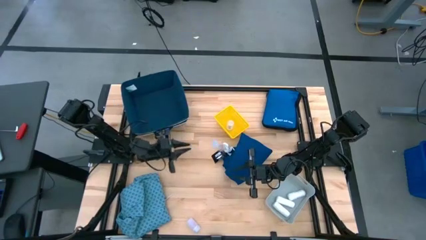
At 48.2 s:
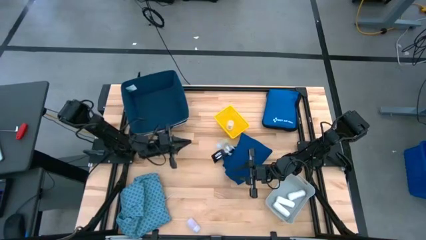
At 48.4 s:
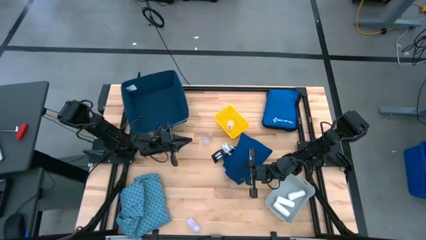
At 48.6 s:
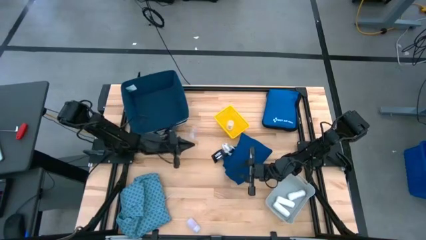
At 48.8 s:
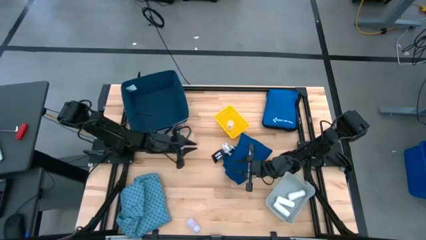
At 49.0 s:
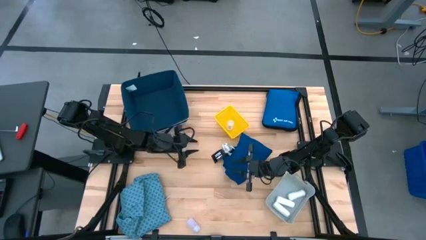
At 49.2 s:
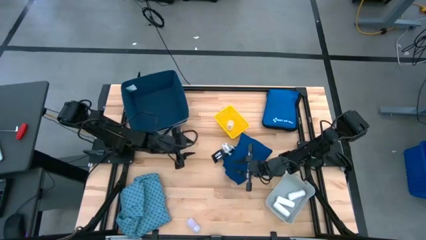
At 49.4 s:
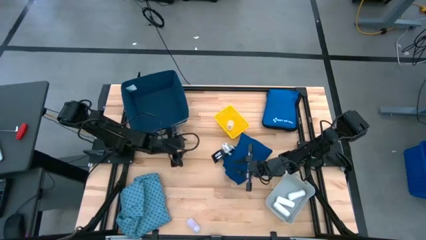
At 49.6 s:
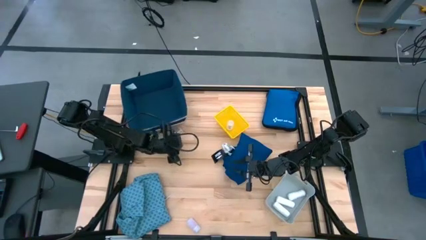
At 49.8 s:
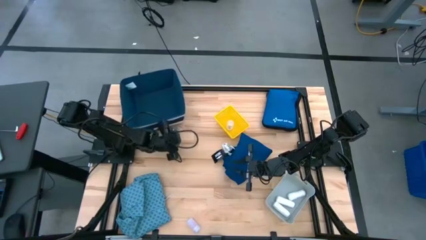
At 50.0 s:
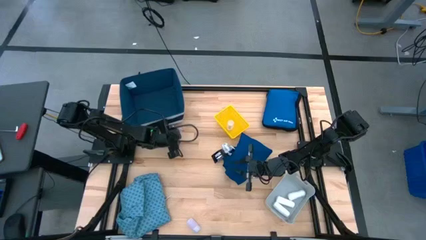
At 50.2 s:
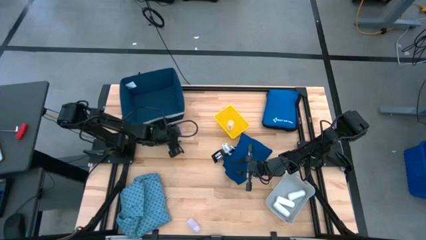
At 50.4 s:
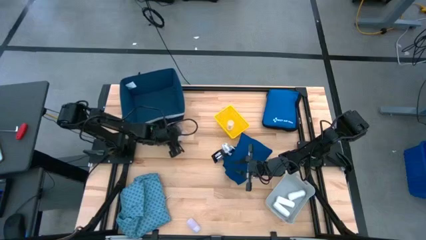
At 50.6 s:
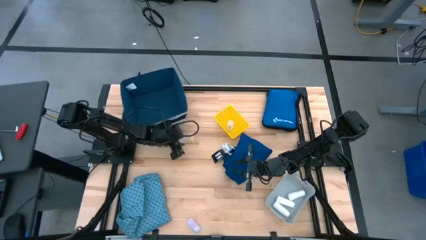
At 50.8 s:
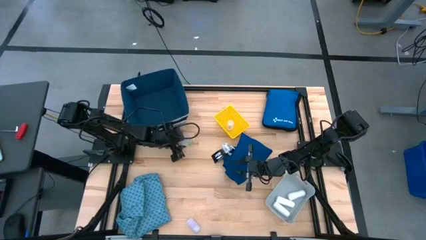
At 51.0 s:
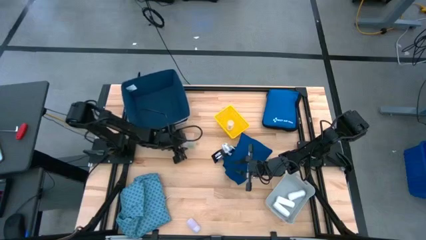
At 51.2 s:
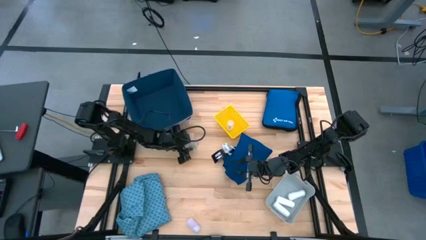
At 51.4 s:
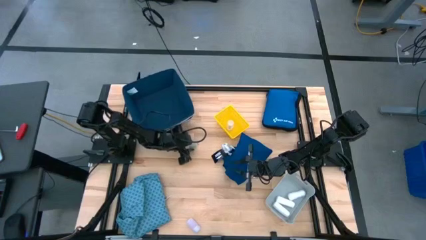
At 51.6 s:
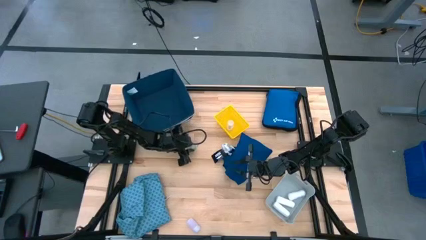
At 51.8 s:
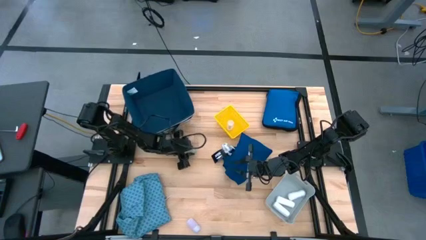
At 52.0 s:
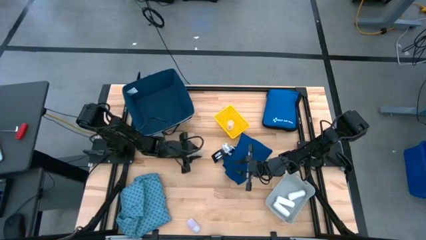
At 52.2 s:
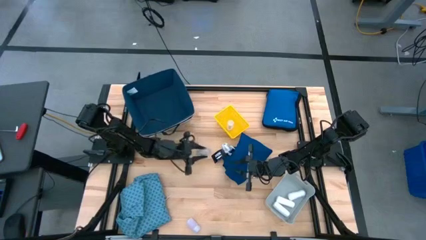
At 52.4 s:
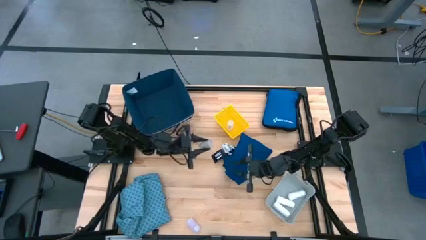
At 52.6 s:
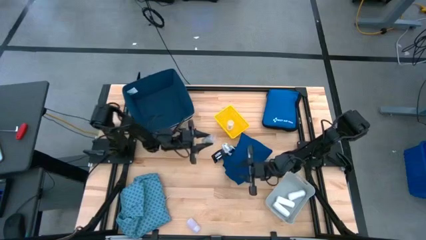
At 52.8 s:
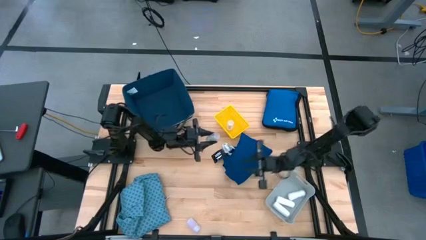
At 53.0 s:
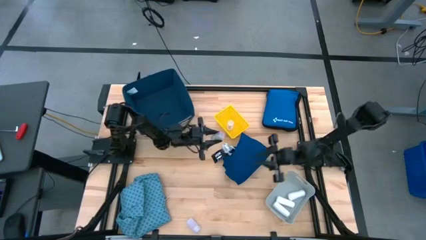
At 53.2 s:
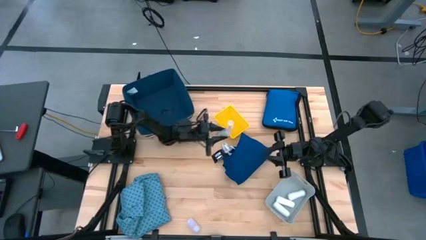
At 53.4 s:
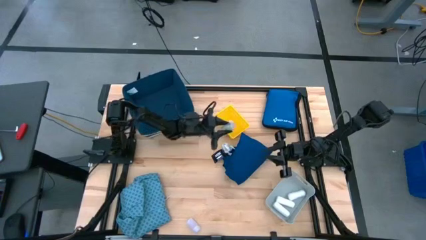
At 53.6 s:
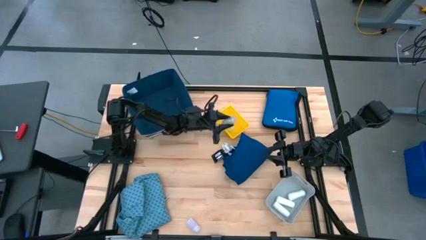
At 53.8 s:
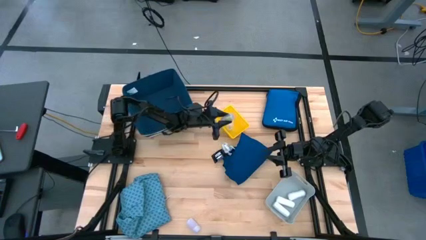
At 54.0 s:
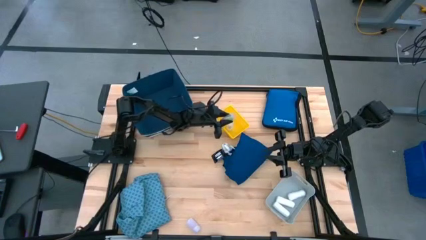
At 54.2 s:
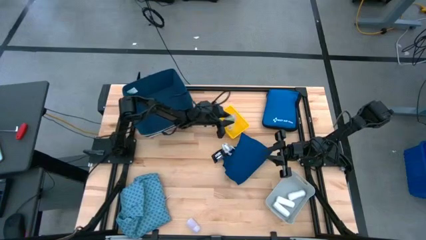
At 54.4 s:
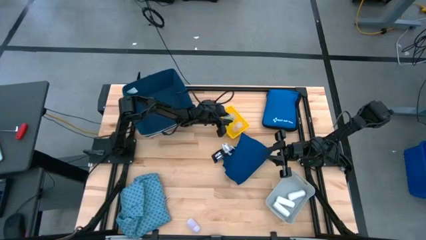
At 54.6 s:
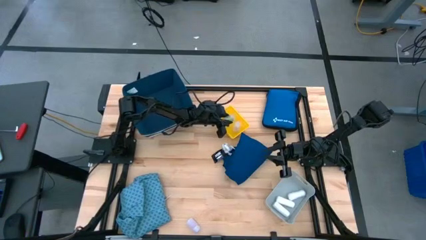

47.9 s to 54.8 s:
Task: Pick & place medical supplies in basket/bin
Put the top transparent pill bottle into the yellow bin

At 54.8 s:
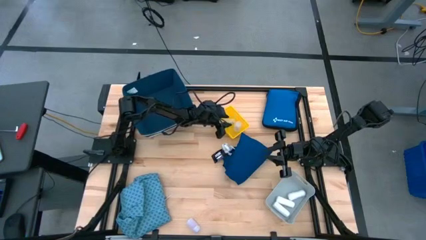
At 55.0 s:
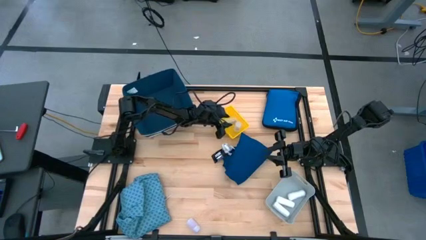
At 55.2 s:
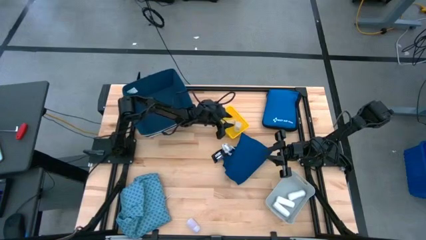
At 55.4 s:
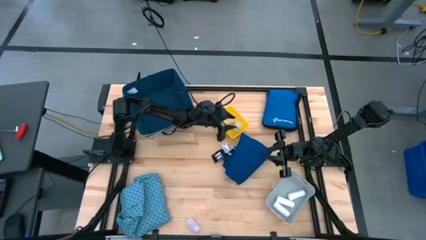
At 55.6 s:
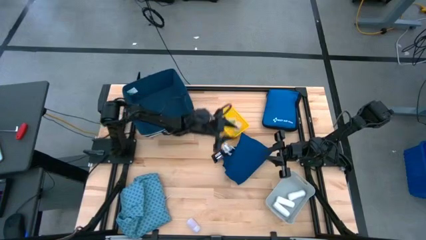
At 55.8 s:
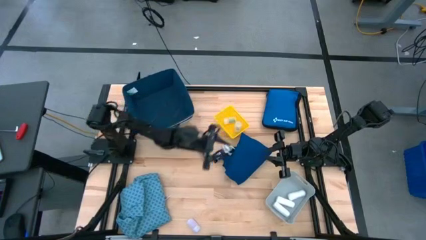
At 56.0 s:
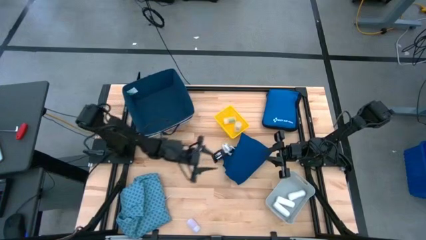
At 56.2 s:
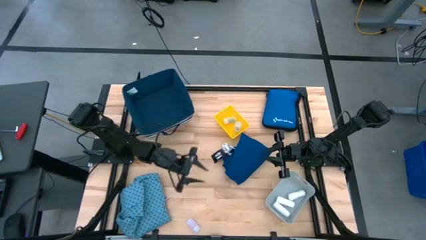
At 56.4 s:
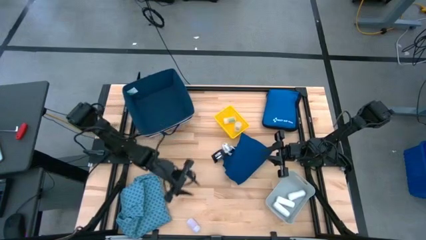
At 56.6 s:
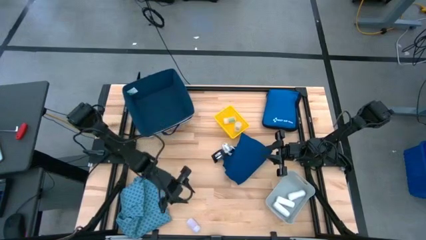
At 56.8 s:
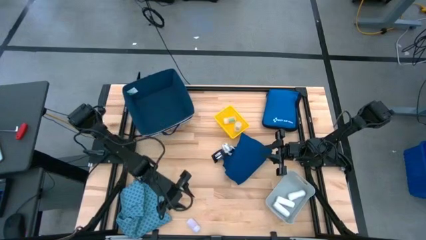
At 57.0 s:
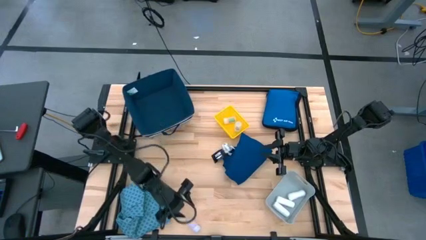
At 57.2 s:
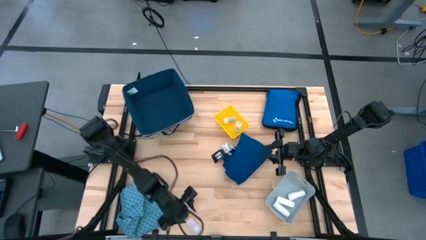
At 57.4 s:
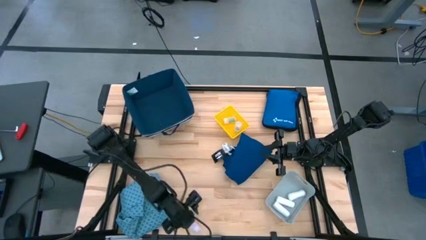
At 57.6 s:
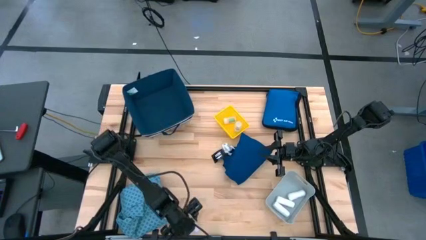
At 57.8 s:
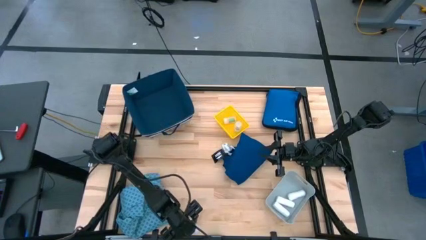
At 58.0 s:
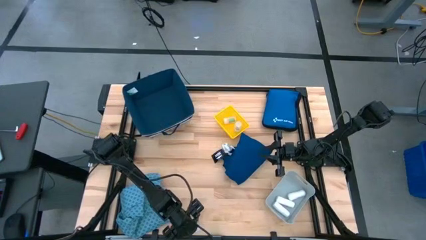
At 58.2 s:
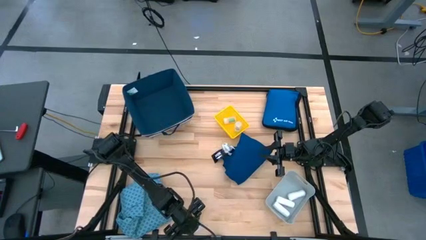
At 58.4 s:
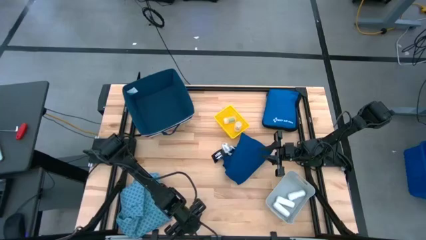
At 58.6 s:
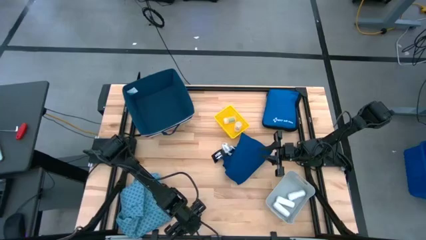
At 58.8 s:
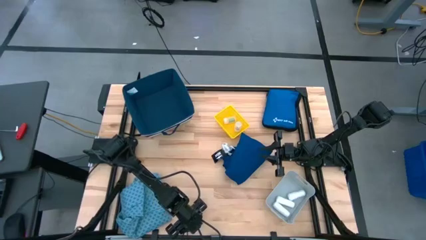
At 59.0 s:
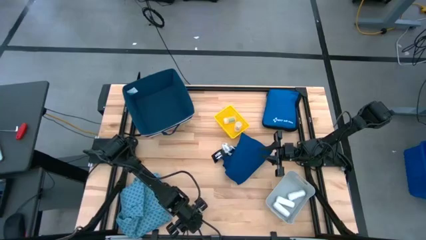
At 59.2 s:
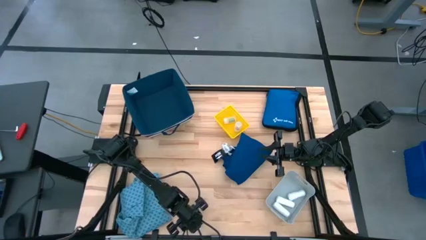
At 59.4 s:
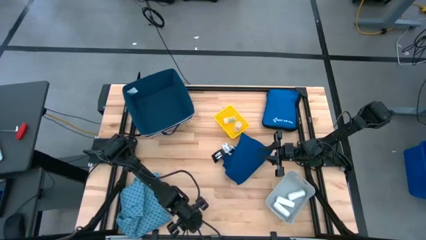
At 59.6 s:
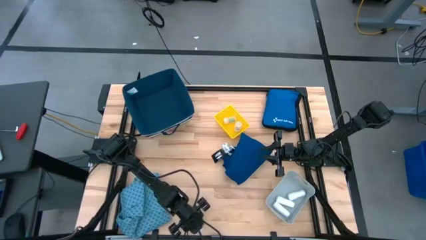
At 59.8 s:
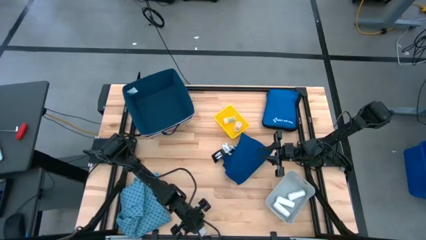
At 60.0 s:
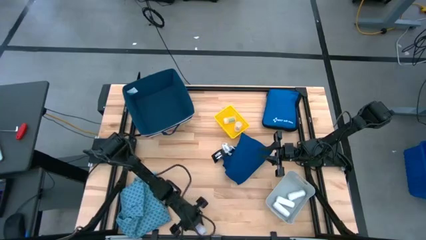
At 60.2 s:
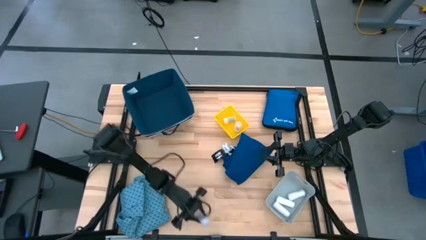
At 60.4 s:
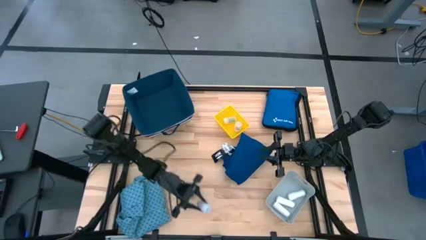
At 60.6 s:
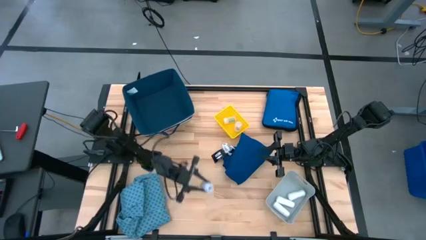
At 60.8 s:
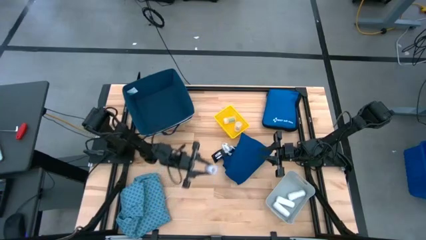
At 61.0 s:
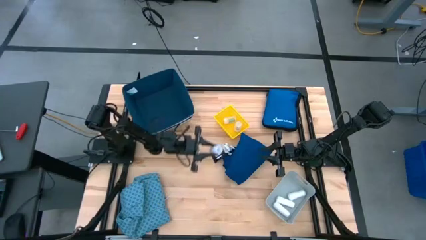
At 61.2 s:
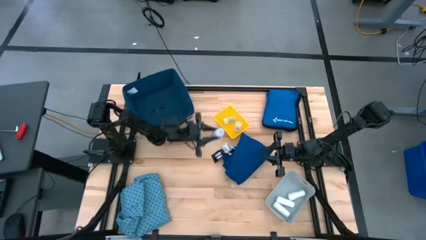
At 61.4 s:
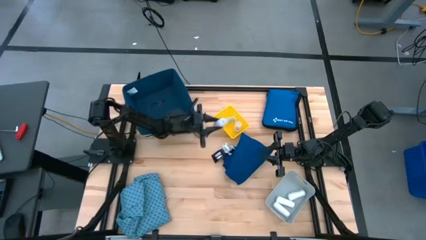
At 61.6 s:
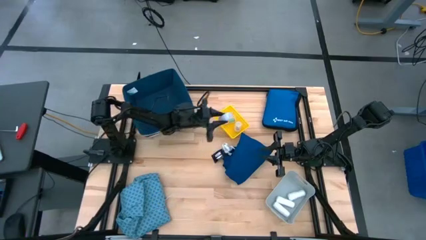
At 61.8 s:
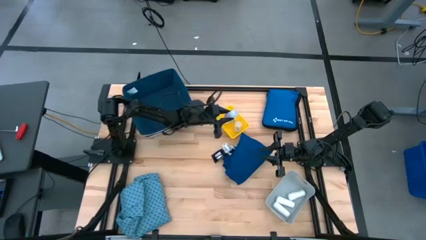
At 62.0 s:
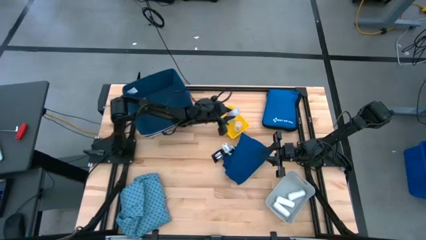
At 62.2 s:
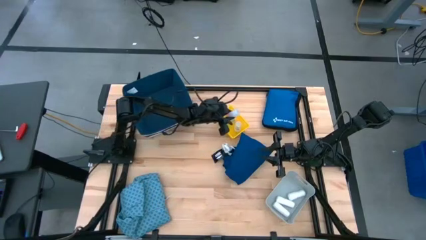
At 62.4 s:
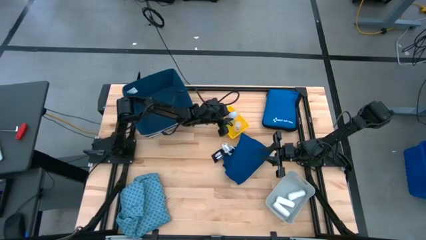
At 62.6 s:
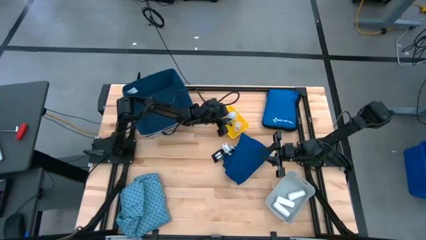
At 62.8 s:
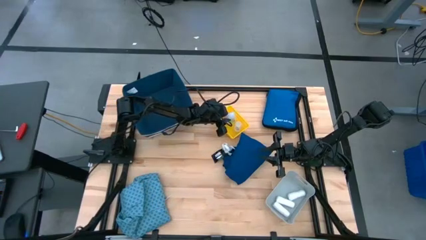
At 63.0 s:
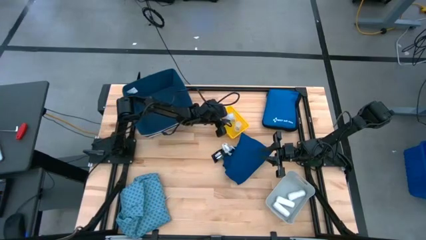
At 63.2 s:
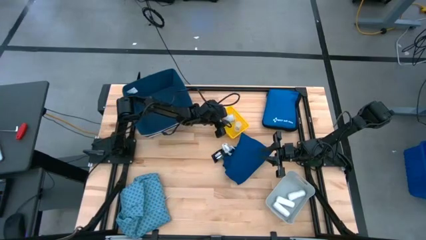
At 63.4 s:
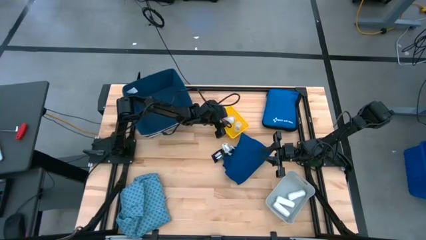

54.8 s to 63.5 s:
Put the transparent pill bottle into the yellow bin
